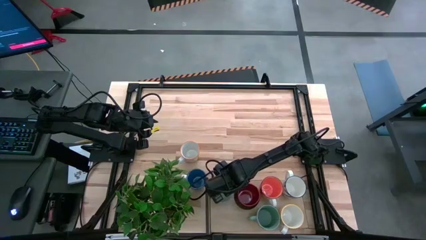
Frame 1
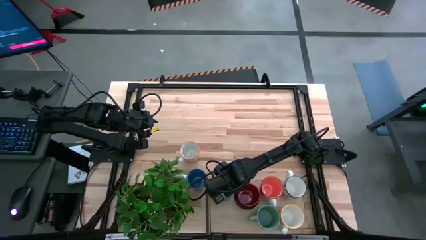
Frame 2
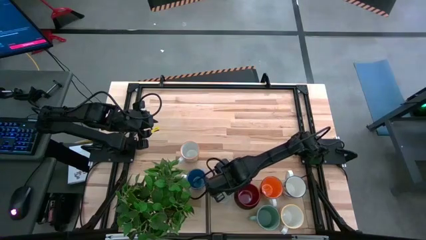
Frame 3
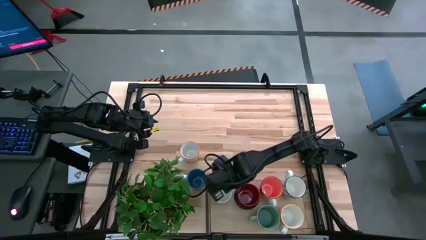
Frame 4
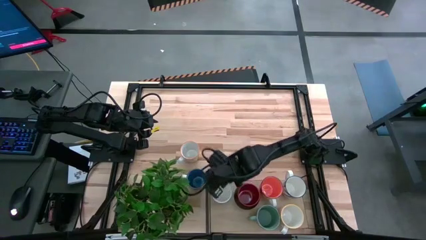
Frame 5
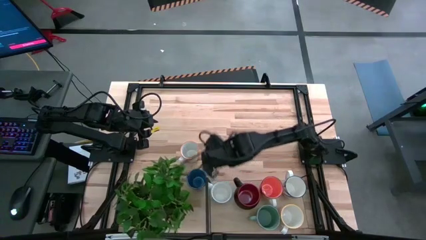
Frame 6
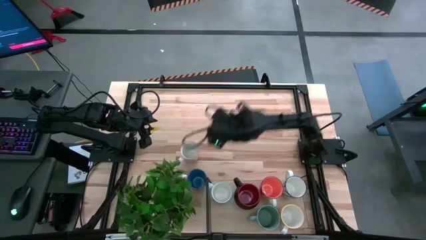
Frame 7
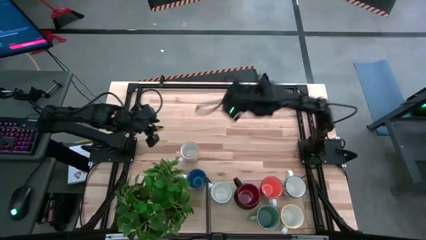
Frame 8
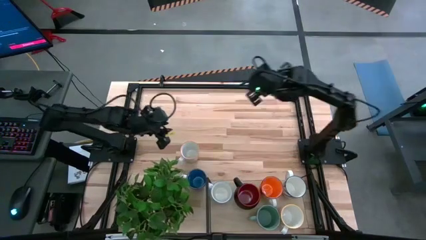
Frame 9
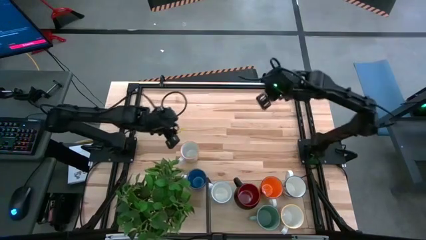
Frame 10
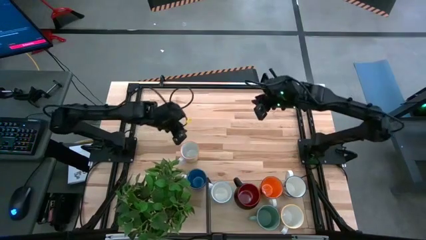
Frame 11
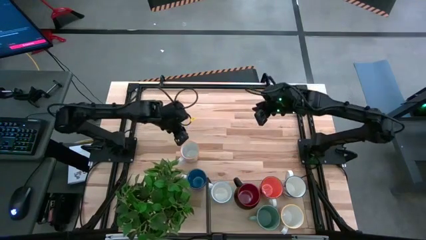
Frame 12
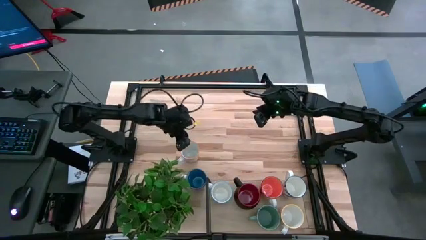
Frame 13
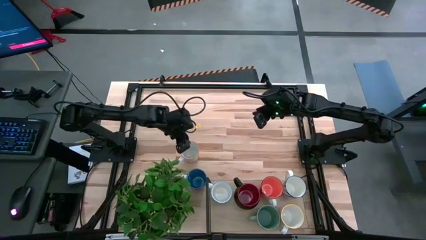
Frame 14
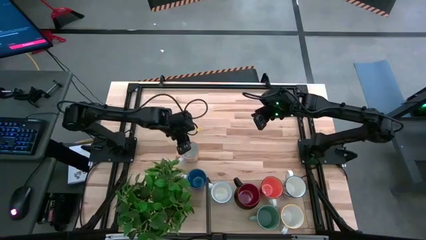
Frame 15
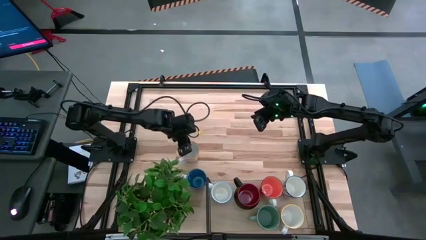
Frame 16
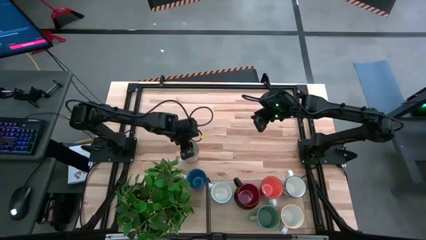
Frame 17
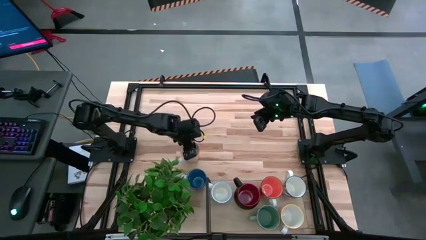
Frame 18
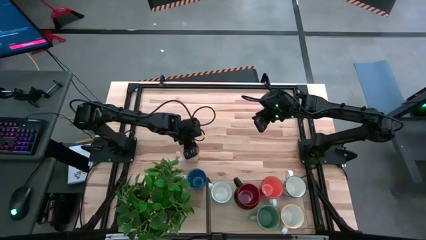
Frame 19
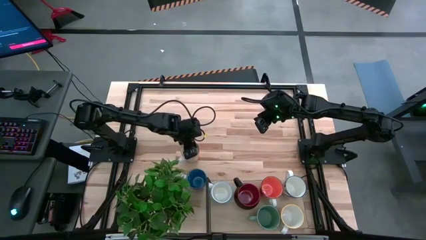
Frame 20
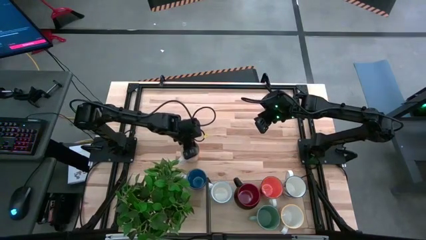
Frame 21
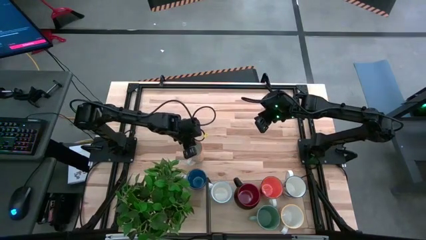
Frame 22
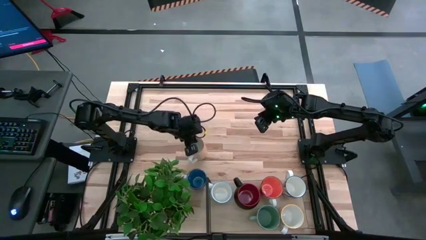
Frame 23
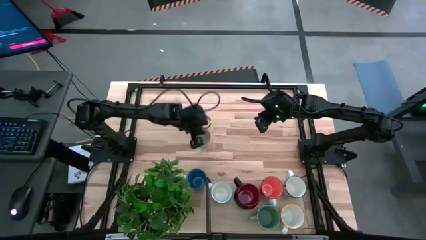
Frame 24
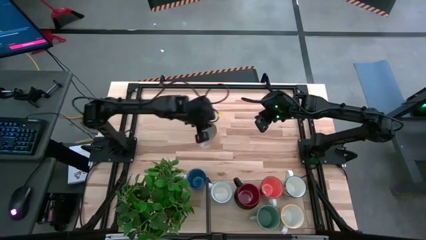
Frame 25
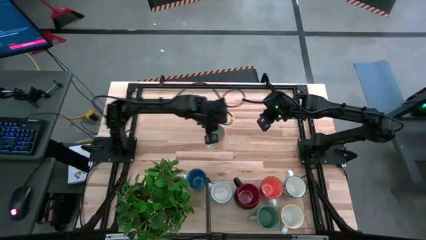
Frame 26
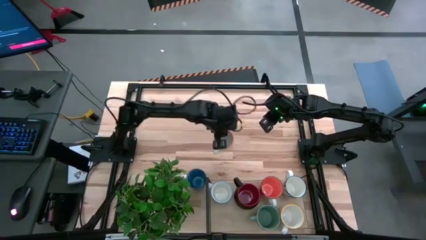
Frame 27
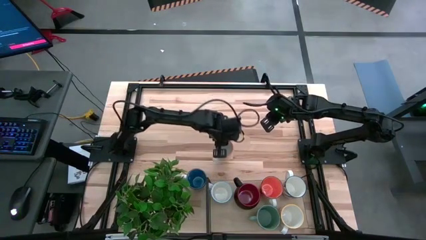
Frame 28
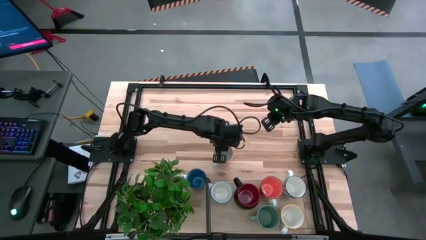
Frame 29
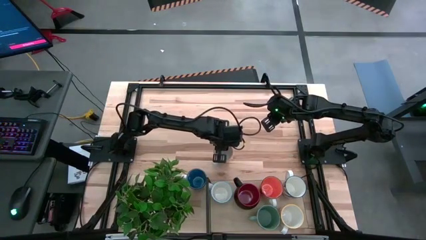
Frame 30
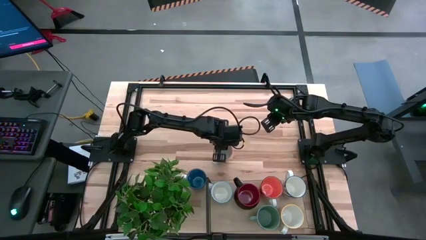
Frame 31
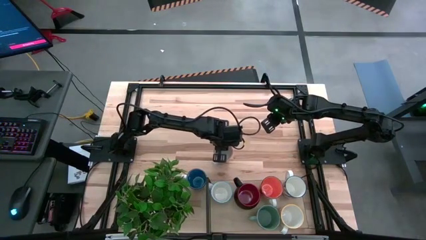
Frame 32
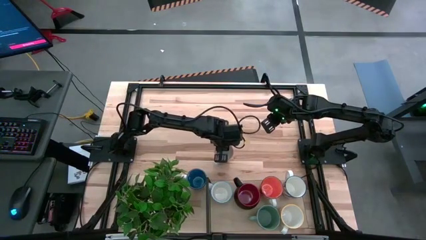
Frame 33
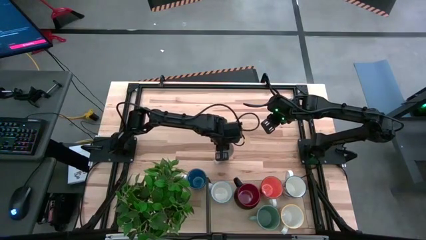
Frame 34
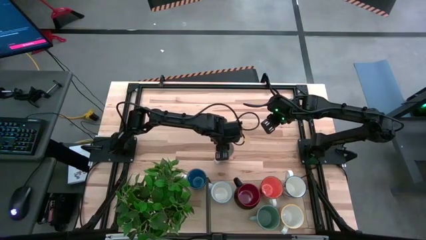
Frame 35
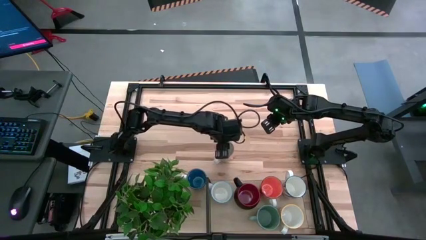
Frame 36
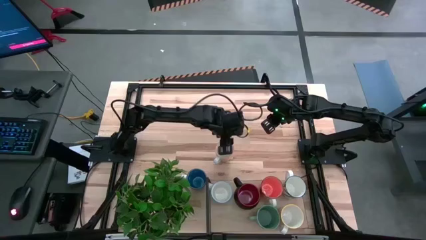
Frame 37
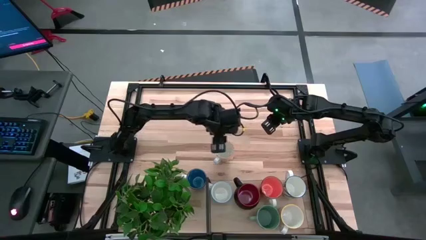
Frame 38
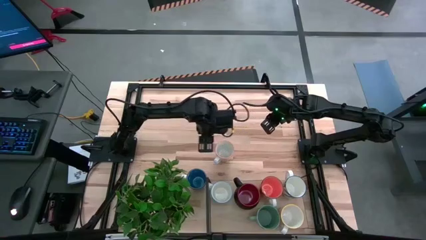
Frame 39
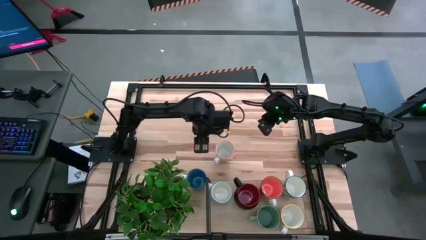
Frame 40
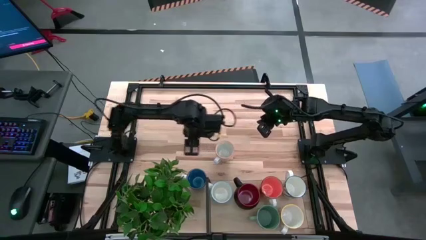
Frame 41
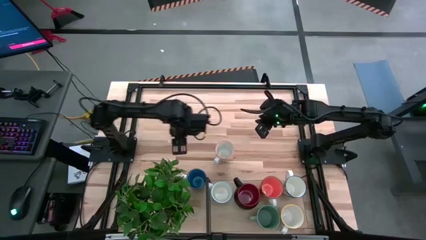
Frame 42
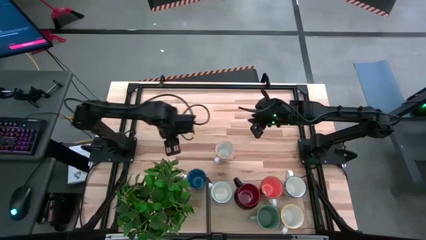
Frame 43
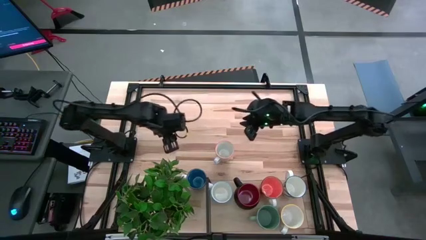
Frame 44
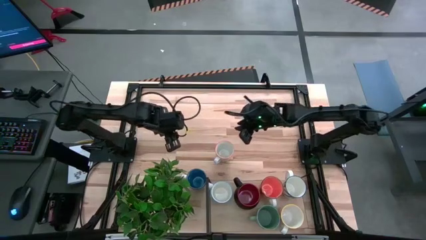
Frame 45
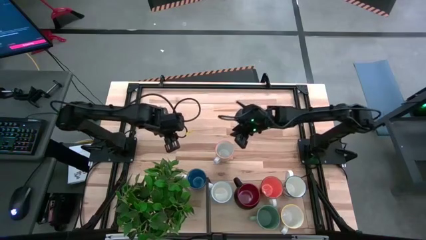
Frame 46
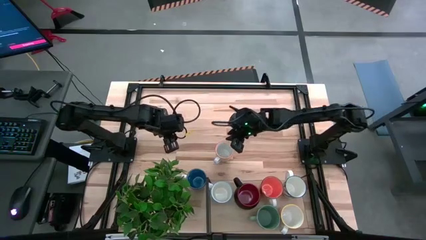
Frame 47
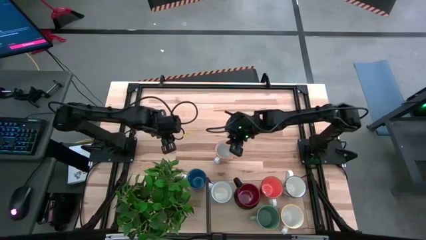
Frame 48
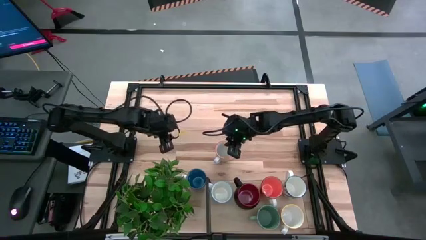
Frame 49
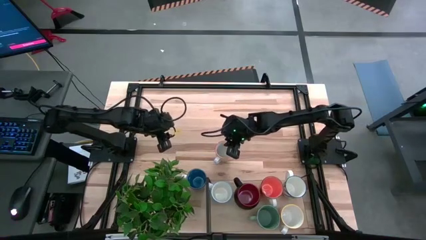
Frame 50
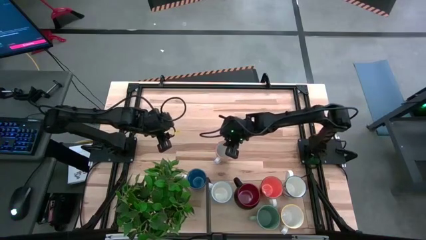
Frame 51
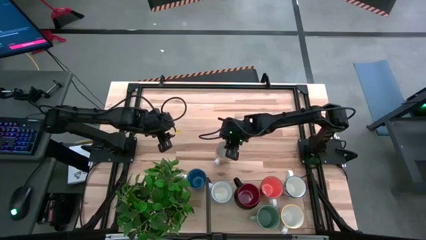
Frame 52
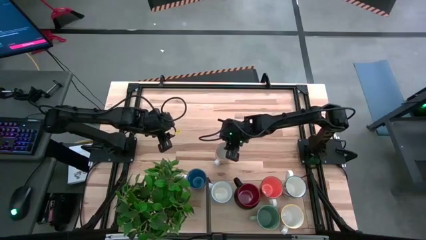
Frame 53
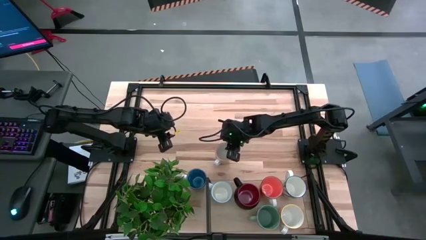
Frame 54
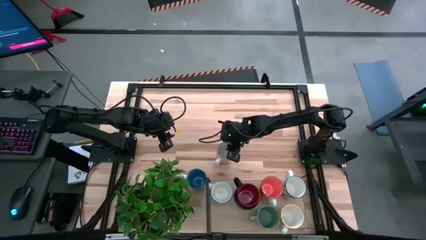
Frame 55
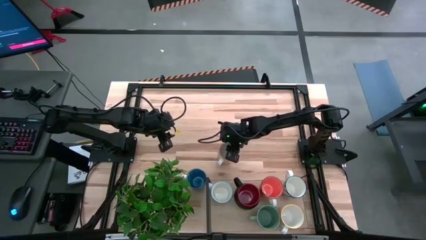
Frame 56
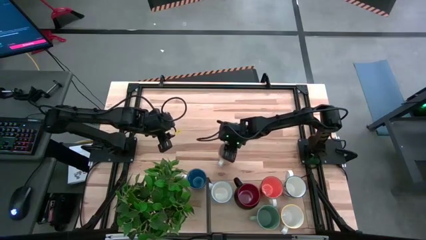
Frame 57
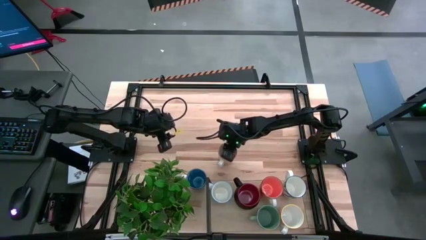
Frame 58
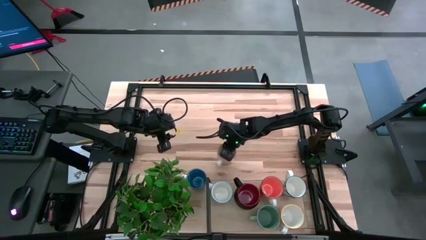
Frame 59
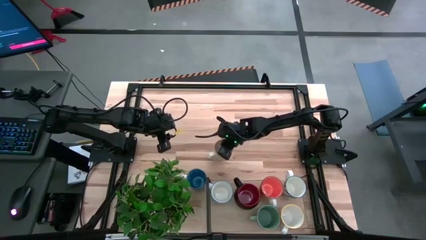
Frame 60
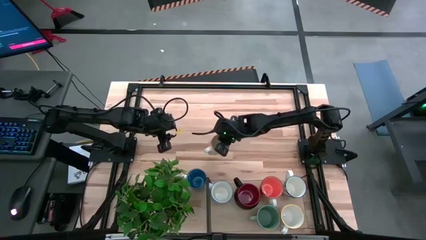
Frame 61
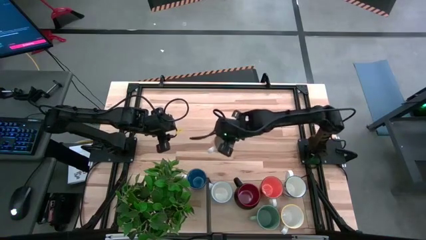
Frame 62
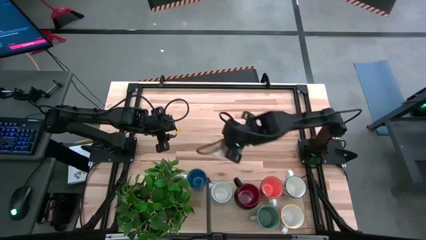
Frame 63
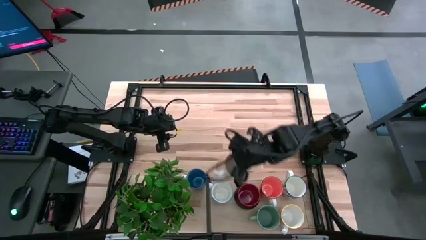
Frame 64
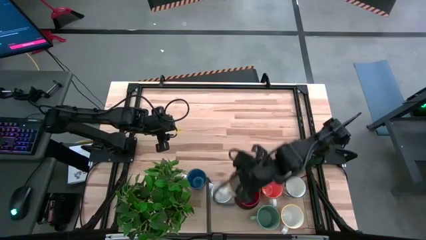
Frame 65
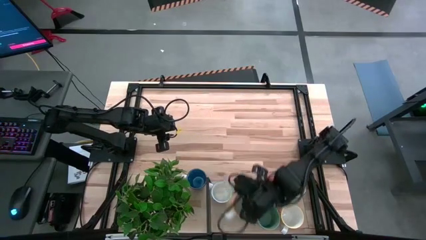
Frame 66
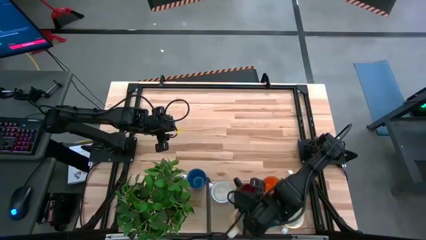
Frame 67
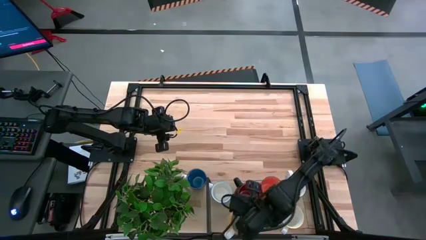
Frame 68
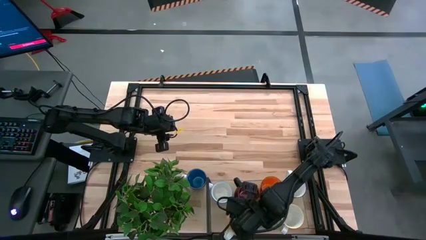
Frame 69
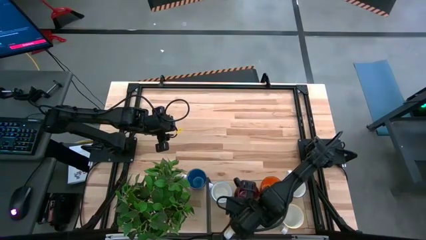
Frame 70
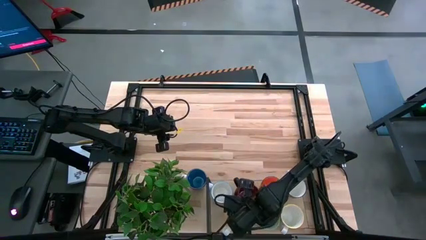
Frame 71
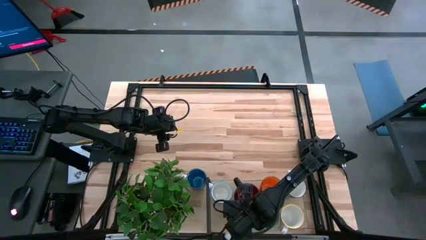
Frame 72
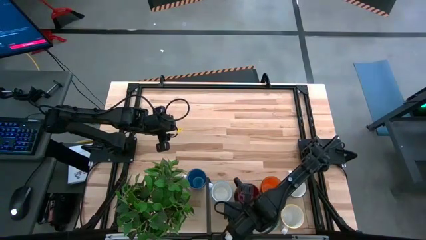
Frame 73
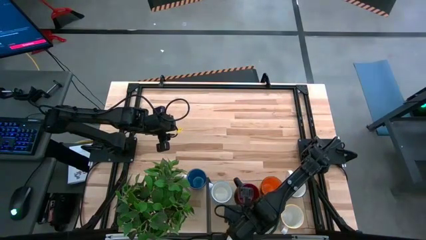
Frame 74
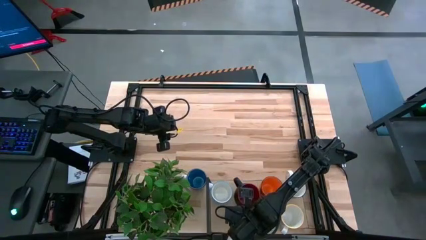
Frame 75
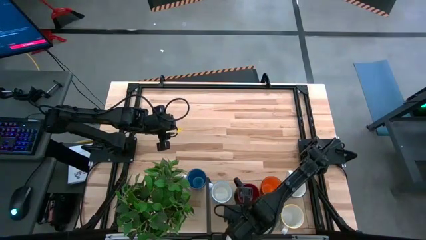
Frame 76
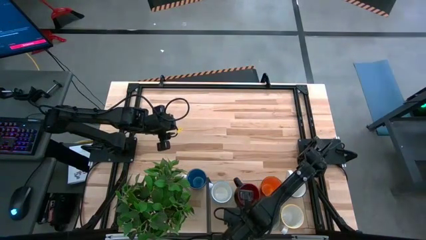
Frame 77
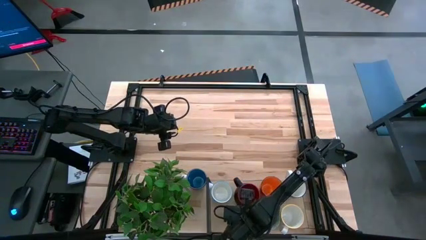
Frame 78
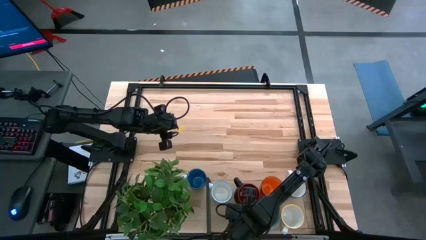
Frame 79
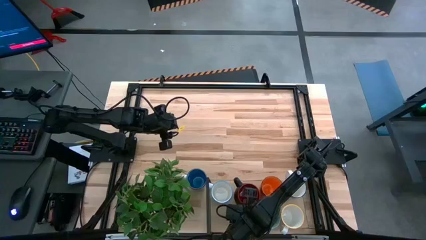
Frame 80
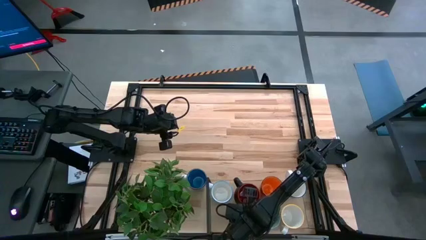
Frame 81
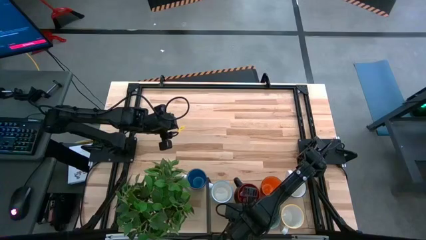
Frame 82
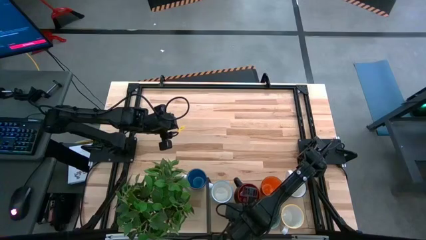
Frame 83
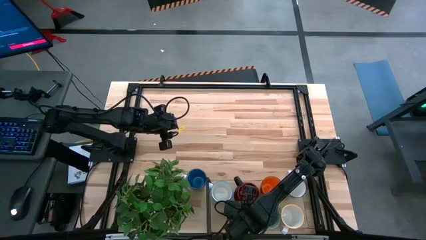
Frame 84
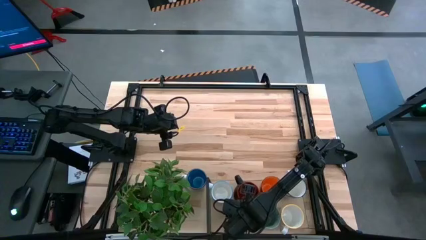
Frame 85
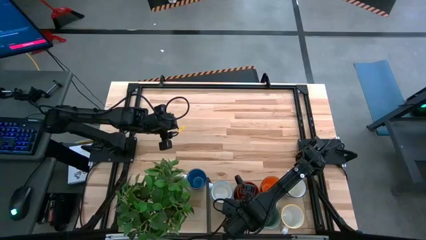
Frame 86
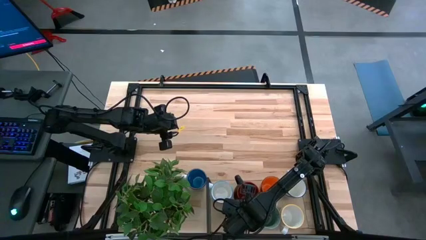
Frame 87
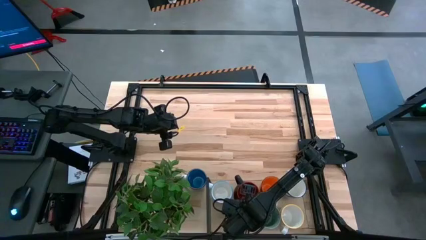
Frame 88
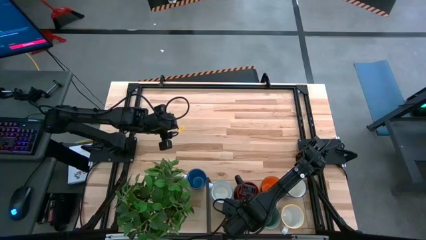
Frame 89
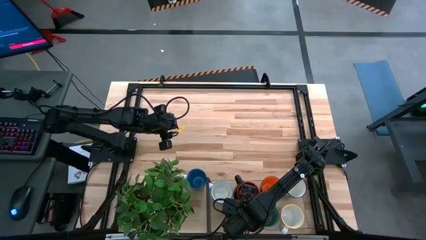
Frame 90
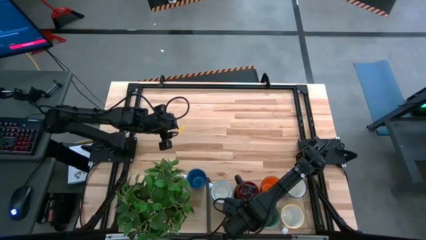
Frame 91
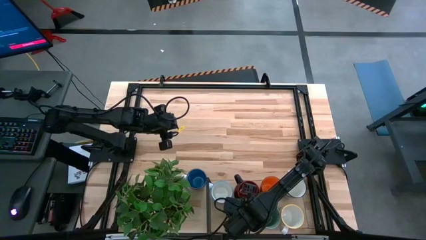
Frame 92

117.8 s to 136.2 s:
Task: Place coffee mugs
Put the yellow patterned mug on the shelf
